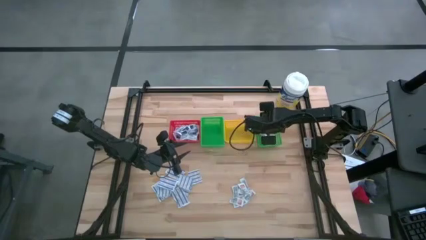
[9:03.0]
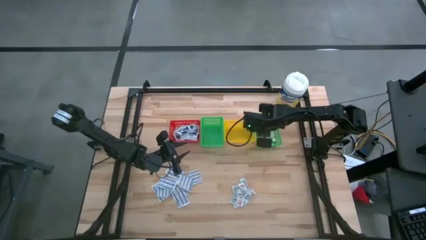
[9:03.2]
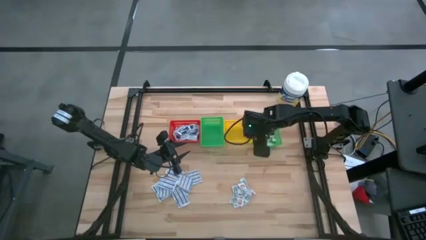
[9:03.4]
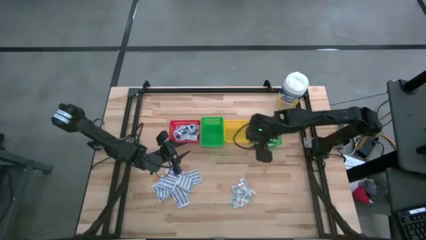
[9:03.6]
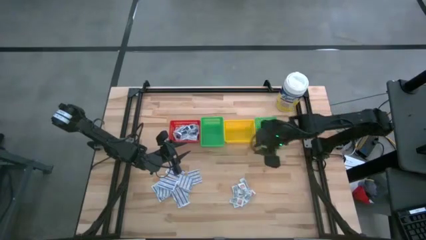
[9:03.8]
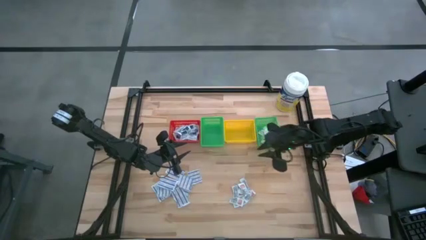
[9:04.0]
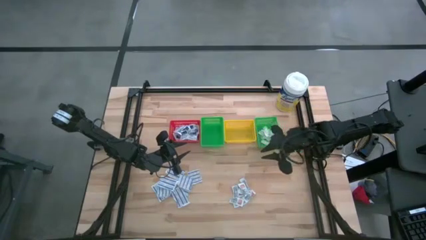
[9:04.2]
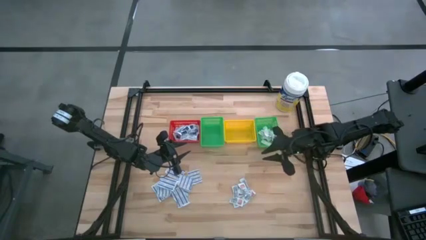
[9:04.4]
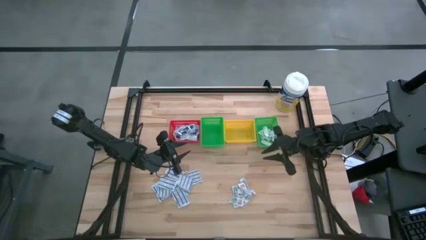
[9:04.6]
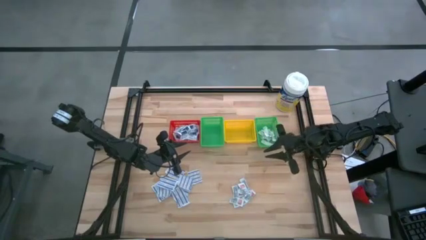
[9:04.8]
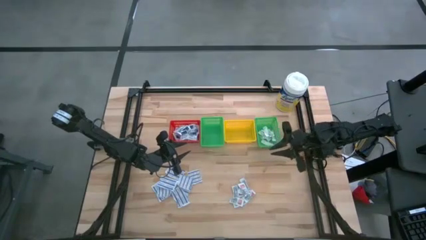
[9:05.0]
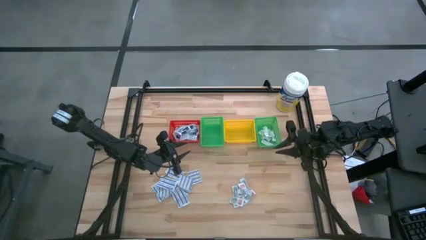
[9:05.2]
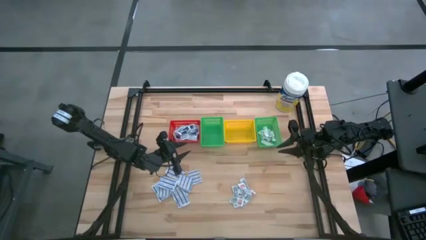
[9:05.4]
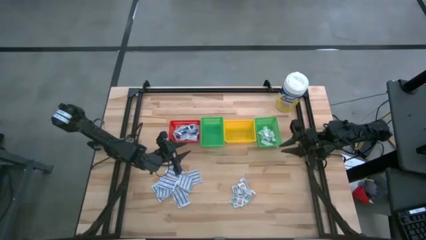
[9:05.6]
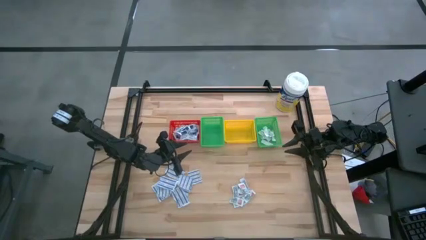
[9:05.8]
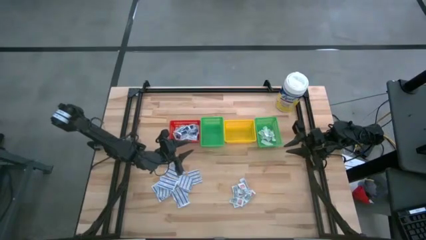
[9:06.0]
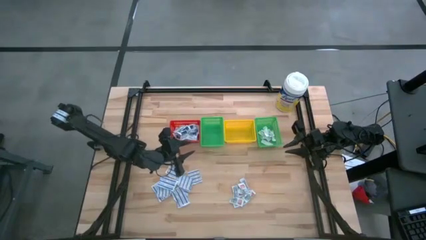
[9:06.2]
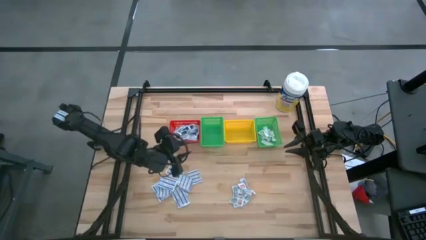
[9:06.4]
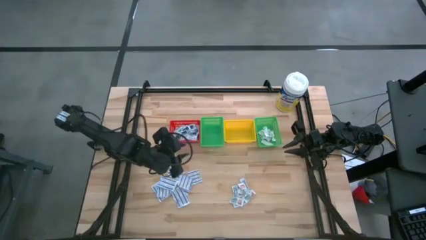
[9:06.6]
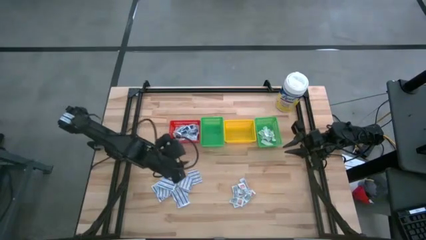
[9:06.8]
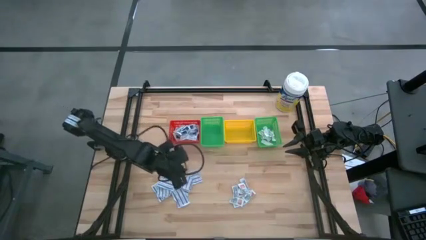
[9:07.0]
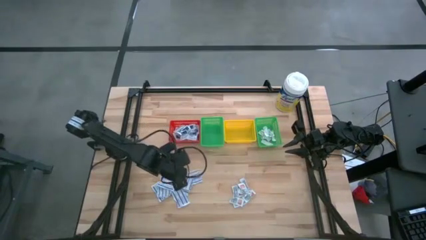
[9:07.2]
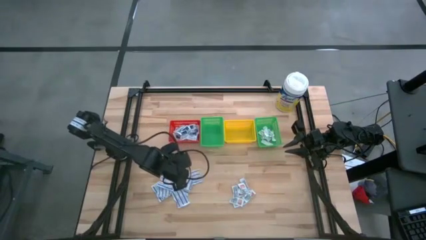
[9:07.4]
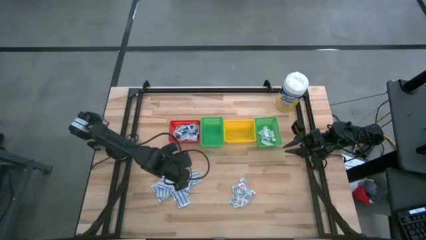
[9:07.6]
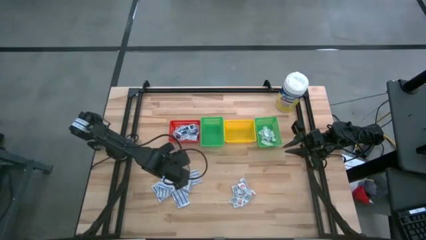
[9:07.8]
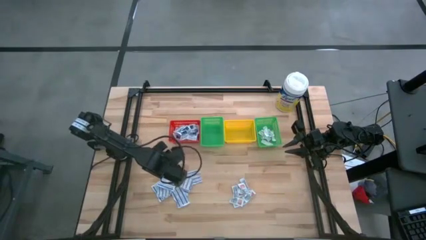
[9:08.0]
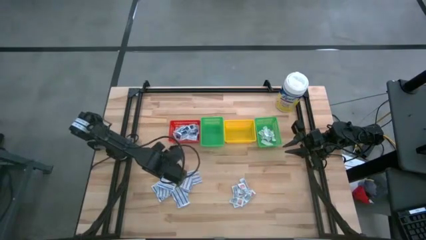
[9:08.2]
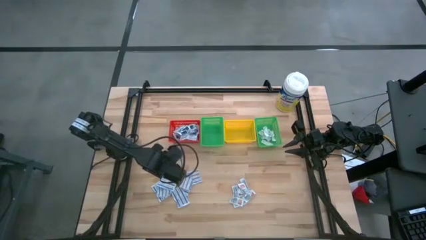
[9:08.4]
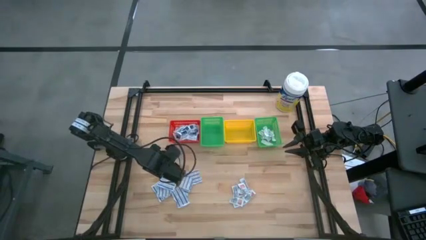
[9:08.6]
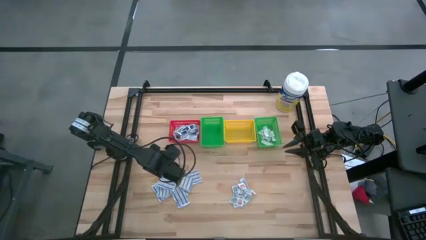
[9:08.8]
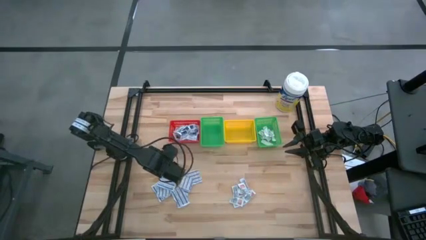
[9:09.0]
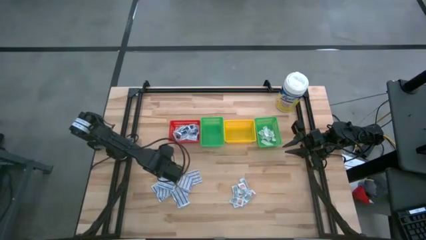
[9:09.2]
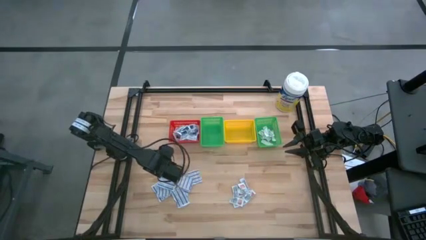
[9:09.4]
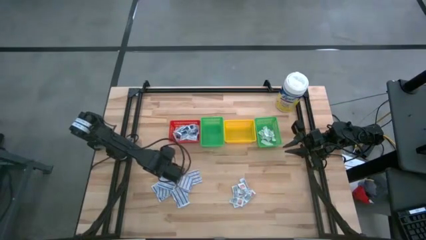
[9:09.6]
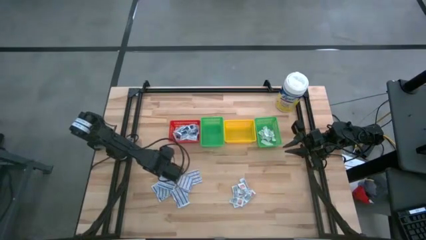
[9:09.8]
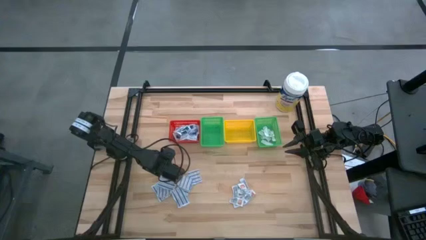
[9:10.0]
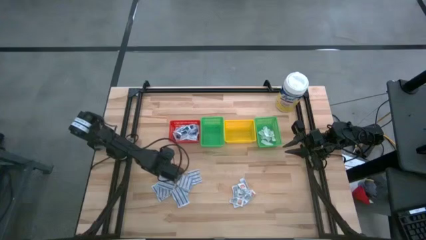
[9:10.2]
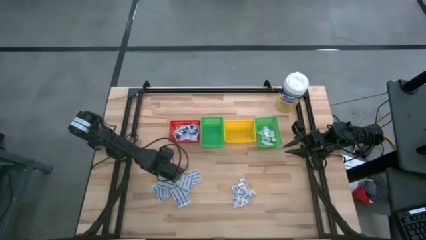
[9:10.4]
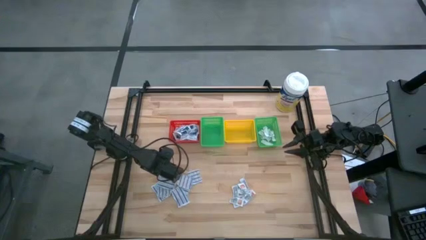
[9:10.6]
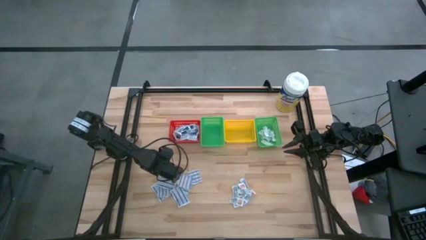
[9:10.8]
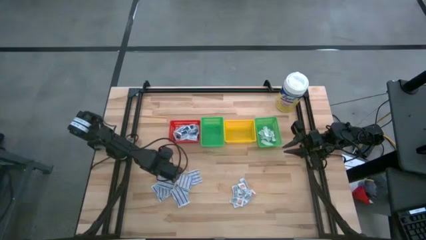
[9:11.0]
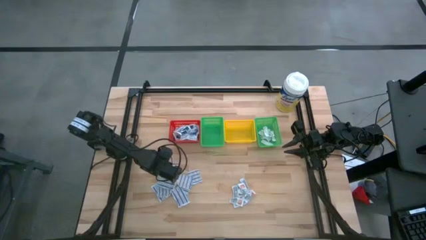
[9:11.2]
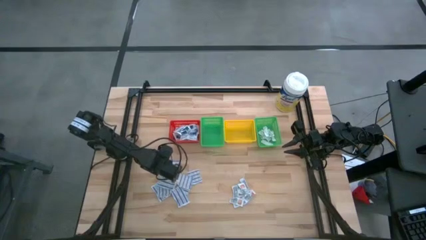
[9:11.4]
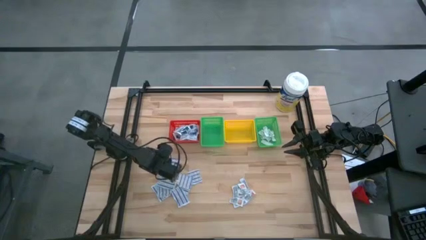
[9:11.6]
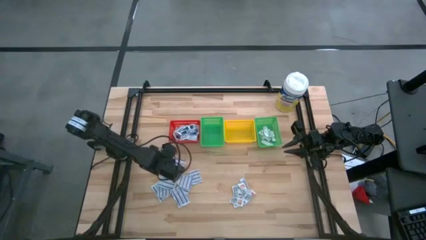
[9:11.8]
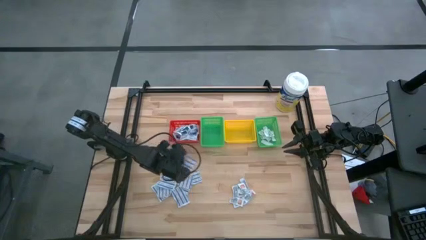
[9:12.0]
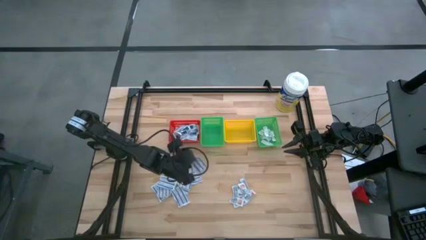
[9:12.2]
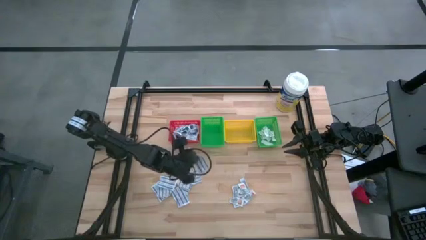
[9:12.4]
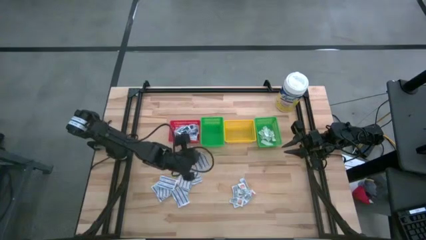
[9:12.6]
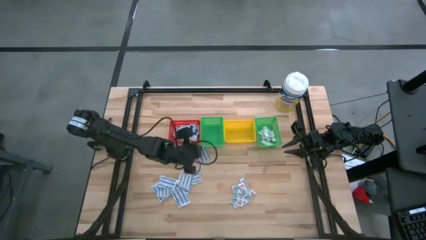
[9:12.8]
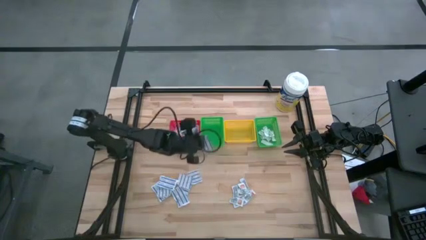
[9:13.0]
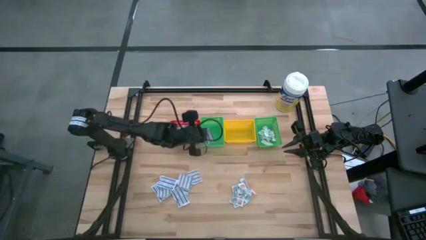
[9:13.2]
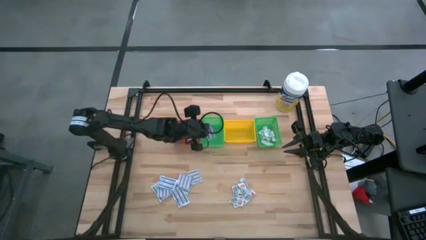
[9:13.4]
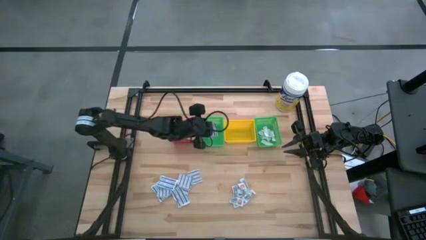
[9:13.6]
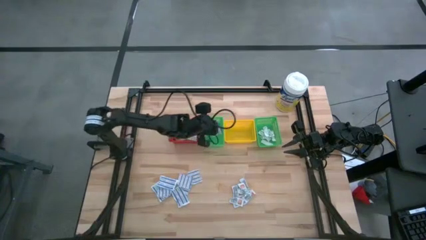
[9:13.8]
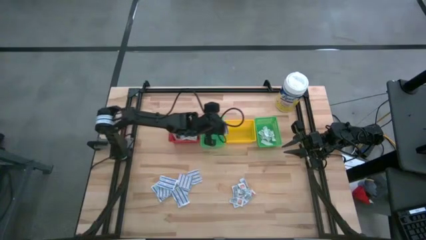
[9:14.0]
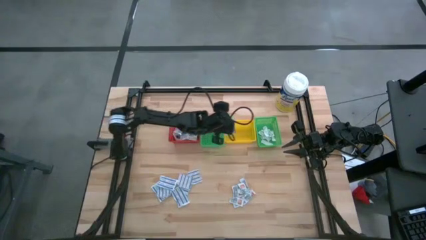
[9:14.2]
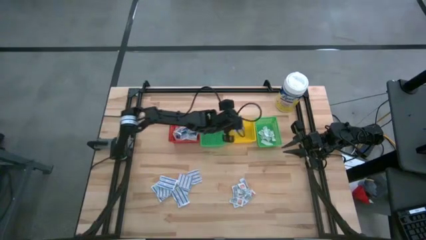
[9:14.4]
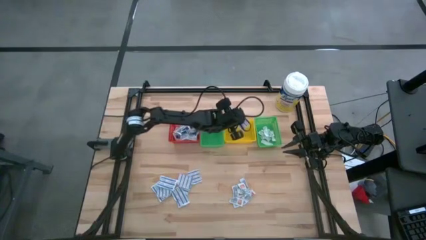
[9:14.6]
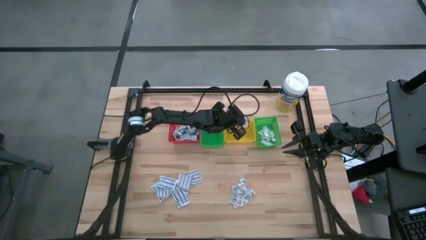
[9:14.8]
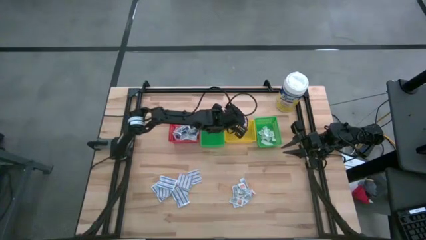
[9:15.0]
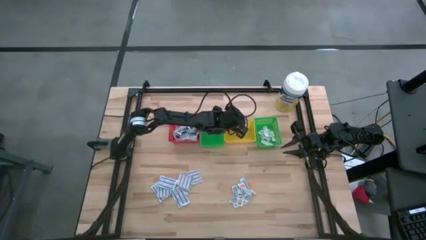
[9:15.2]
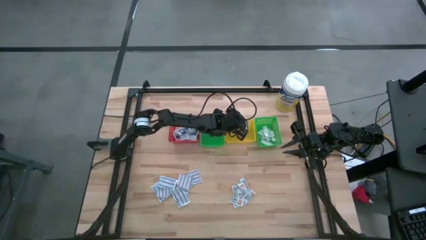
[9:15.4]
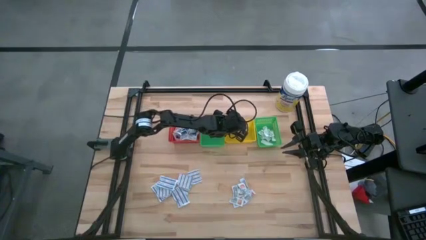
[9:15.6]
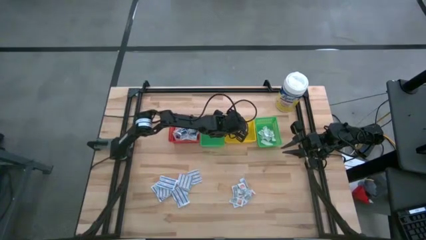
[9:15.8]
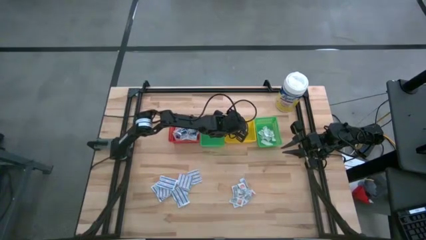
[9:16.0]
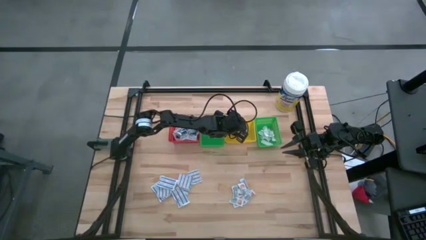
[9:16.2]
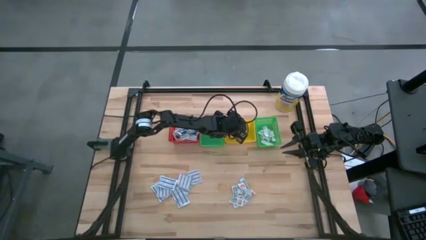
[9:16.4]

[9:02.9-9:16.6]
Task: Pick & Place First Aid Supplies
Put the blue bandage into the yellow basket

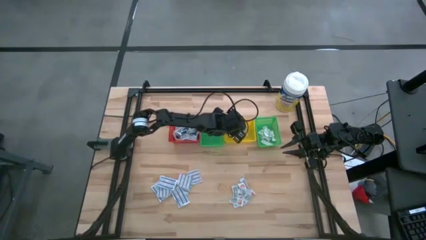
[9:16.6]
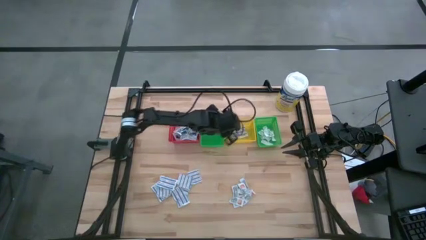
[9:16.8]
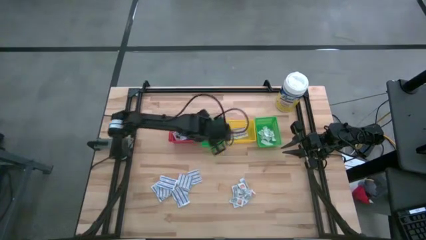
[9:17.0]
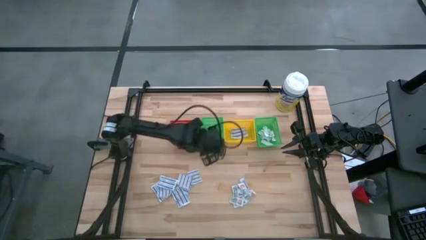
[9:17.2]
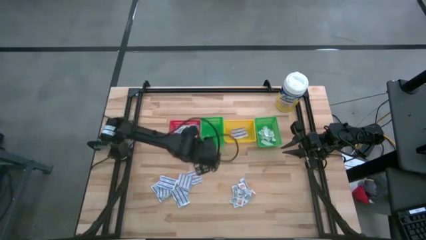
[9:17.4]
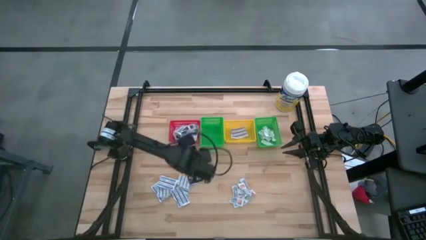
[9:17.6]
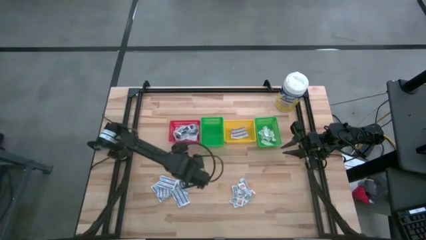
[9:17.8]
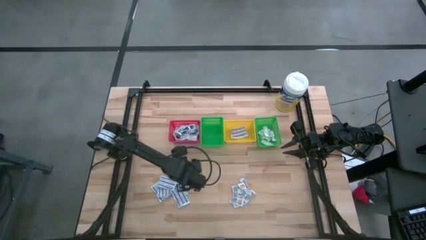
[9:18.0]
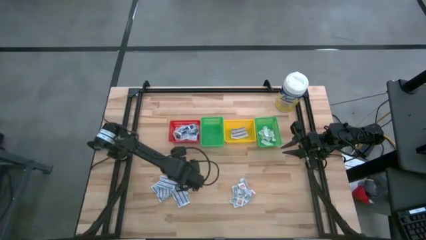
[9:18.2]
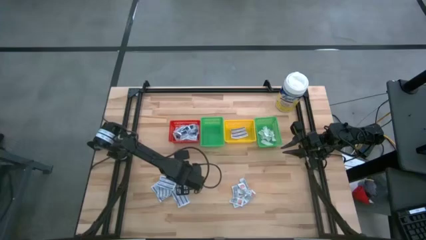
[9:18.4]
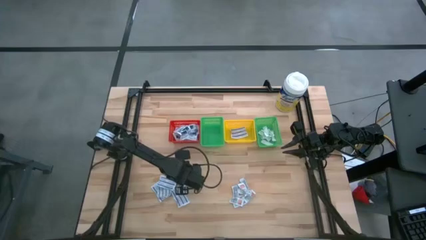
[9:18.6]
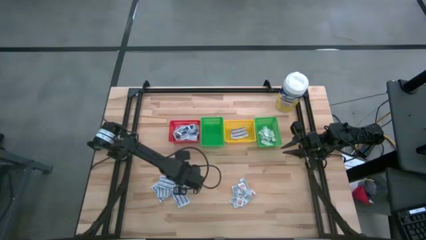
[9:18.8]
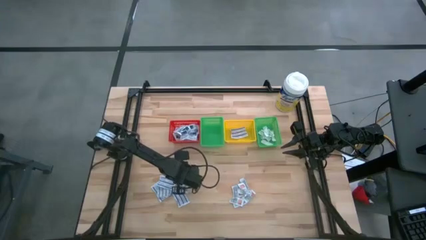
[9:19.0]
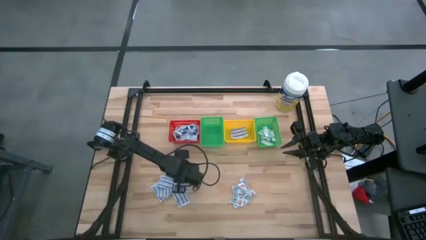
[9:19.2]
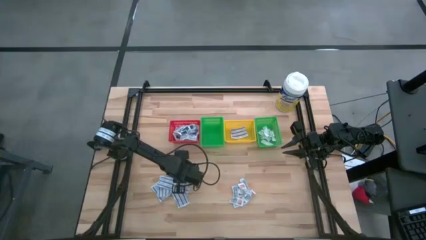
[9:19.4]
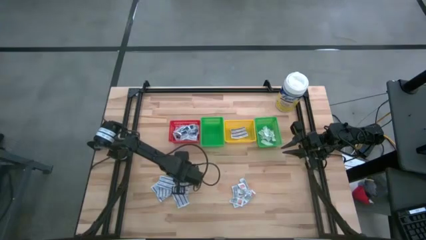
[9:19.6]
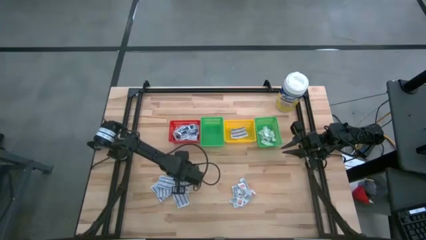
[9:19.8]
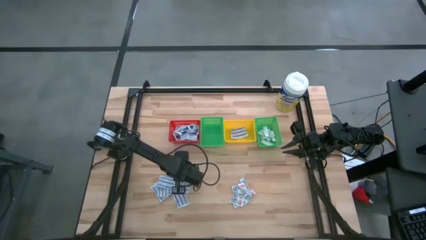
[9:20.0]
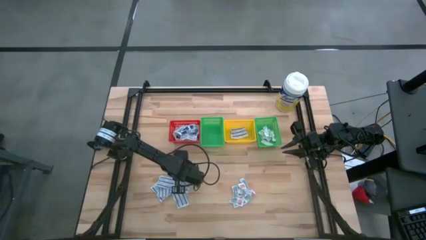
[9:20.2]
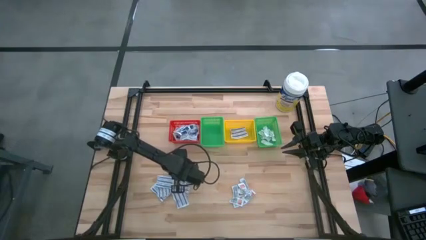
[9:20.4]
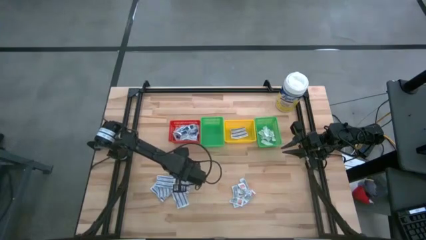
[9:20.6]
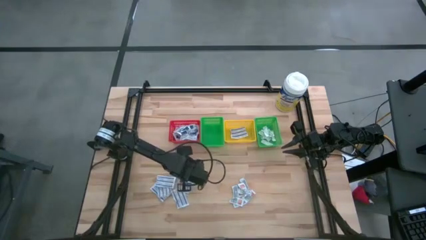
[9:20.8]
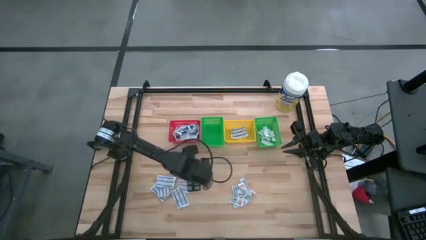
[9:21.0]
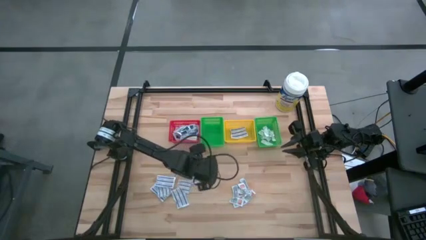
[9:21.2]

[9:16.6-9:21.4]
Put the blue bandage into the yellow basket
